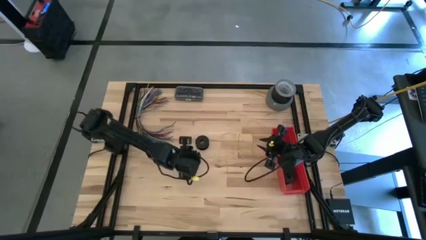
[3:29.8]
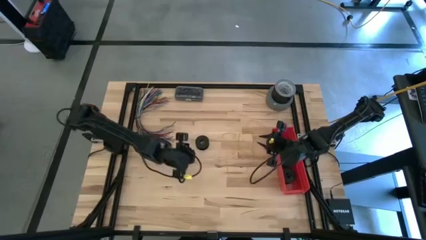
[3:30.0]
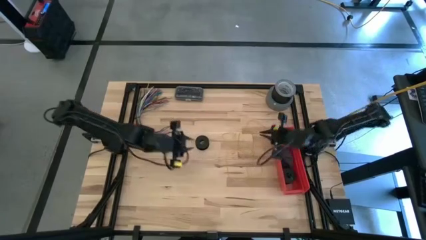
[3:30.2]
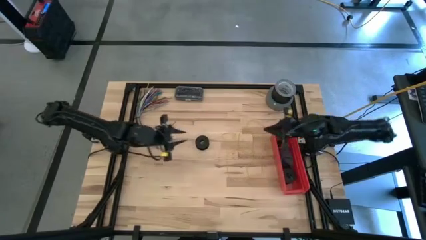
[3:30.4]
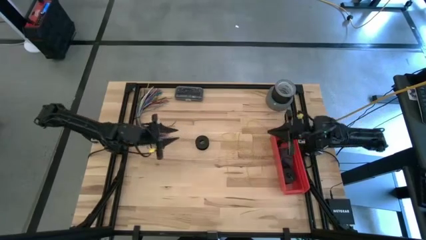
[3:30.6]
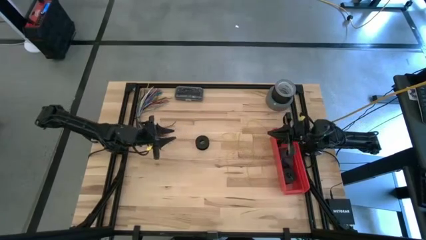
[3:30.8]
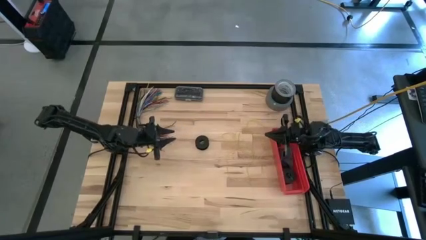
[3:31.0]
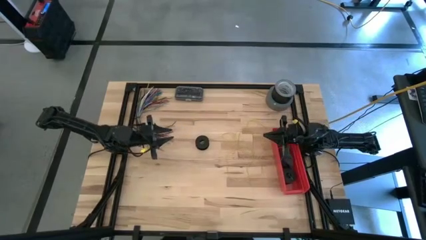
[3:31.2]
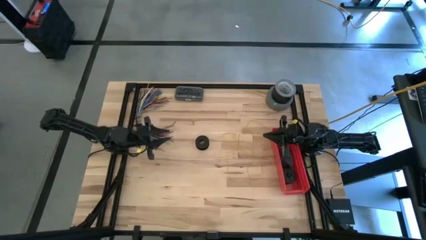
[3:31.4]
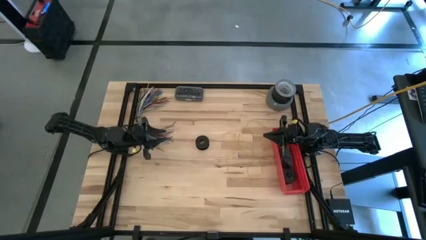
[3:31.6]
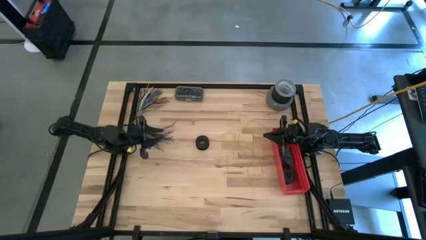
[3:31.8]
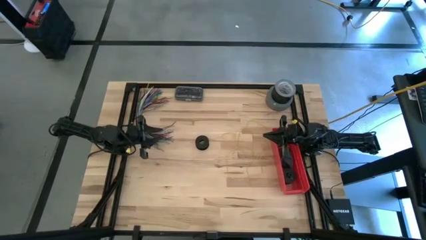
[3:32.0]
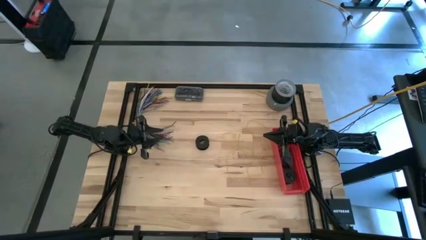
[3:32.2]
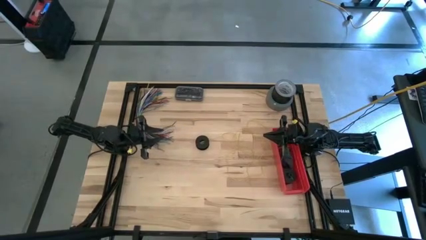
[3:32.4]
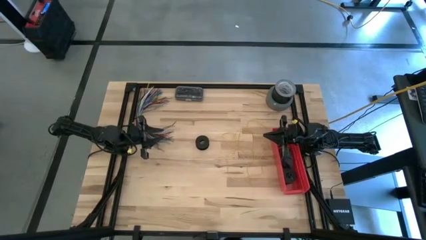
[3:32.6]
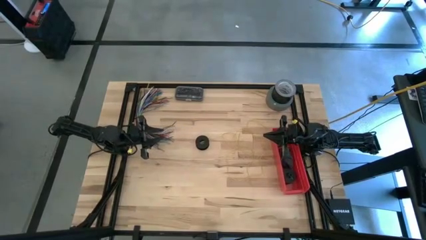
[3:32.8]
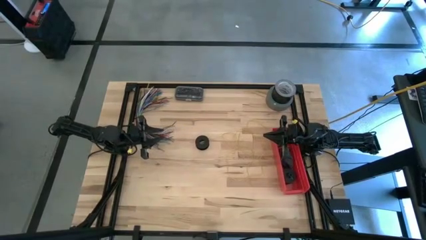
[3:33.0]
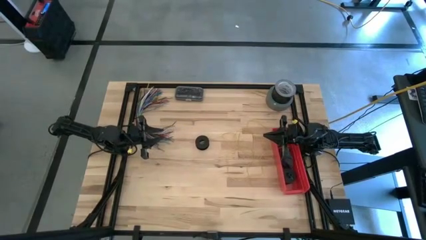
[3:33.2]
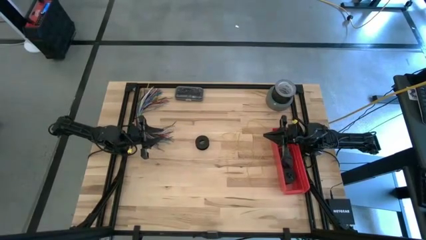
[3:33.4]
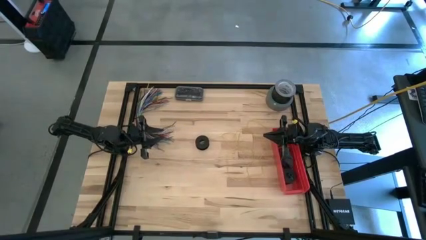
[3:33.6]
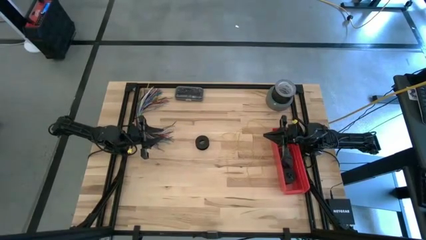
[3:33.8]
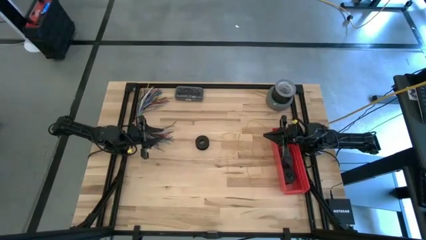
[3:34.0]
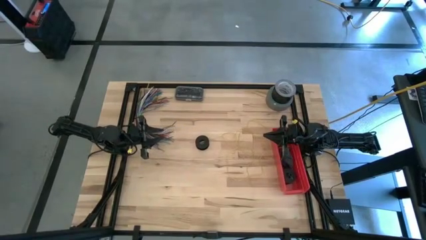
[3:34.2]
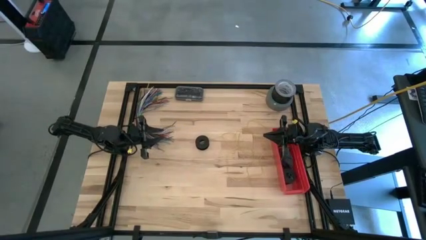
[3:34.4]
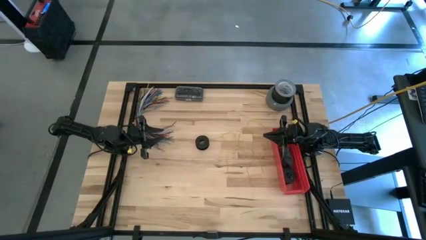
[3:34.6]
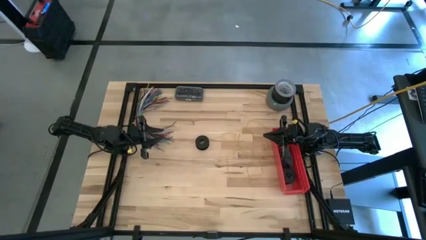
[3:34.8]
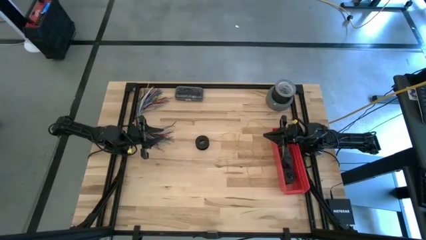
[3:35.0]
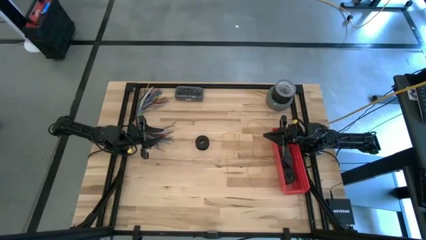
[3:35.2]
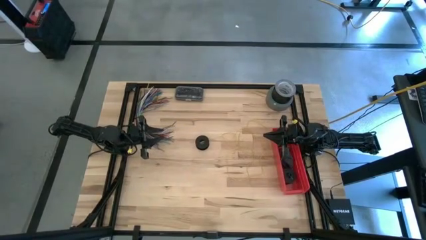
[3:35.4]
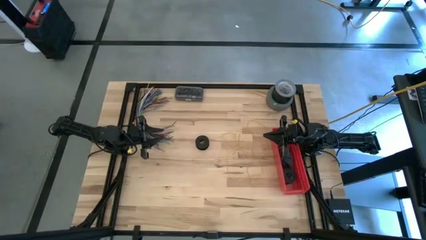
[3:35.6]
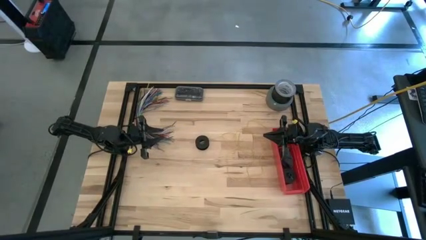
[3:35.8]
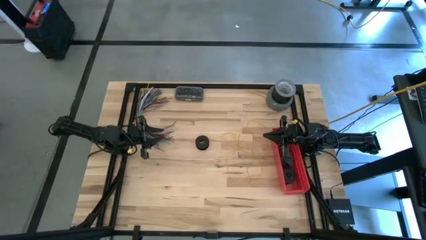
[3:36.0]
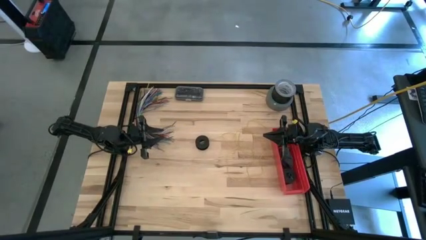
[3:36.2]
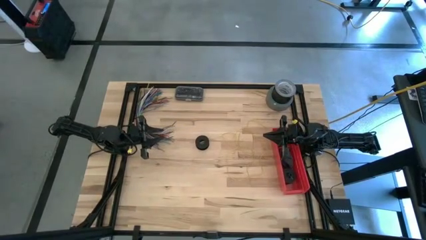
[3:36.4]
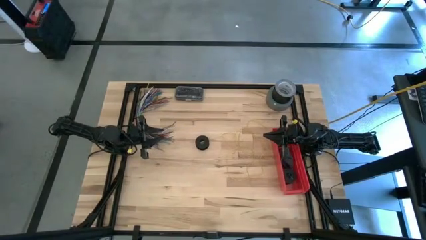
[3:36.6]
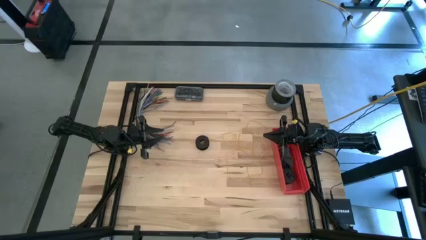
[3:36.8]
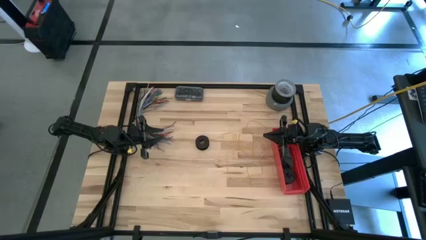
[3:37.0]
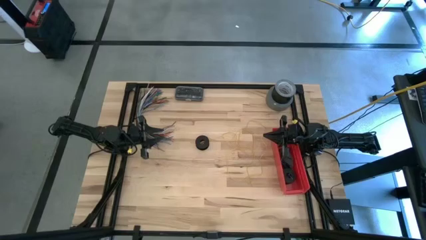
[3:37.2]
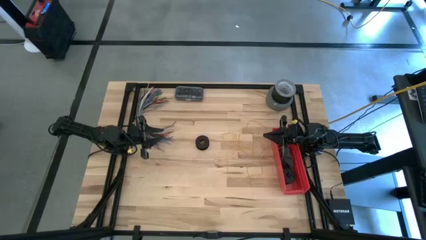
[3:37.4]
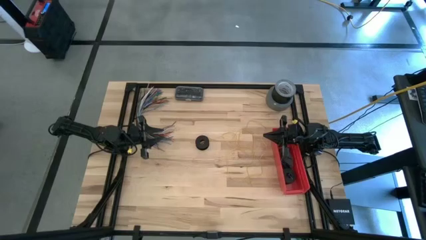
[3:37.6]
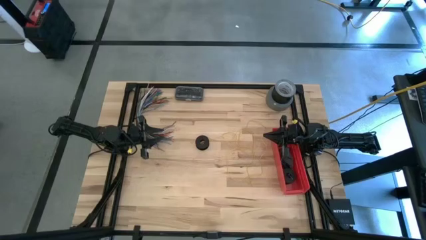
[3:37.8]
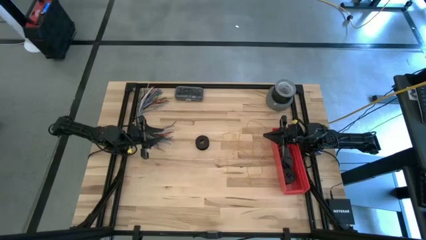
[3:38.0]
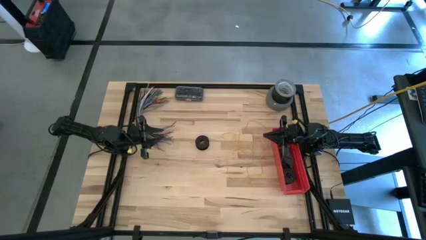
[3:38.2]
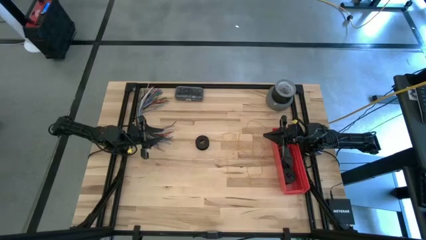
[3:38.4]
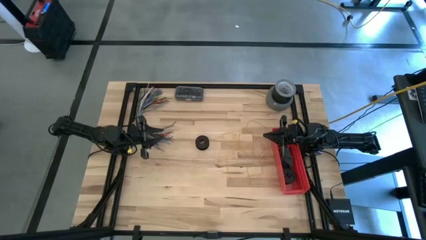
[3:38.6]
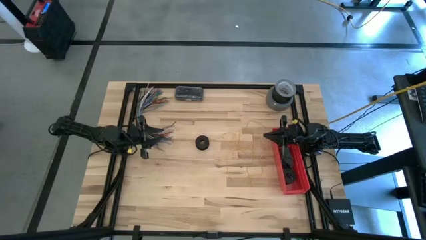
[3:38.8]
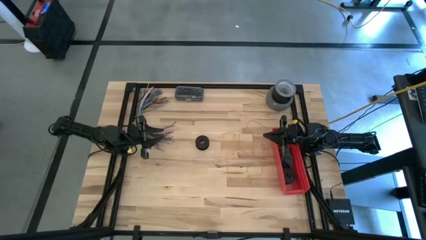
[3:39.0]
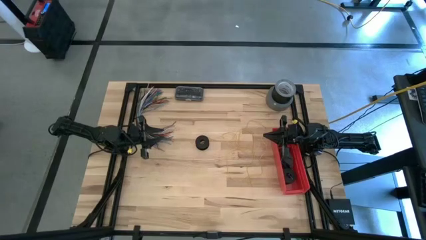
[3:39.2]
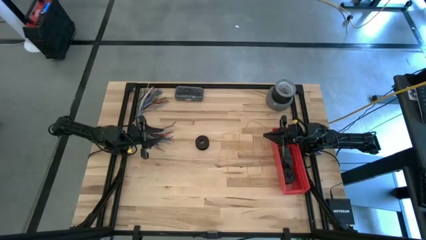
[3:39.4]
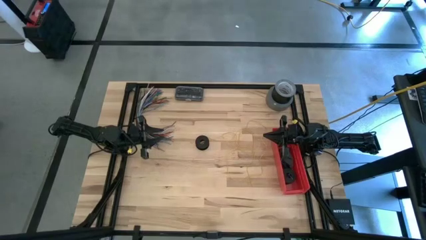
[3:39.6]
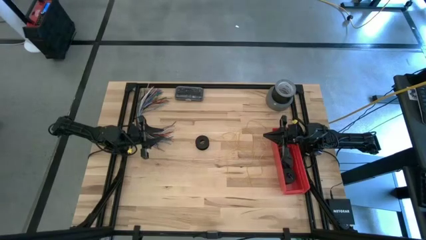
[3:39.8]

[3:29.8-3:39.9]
Task: Coil cords
Return to Home Position
